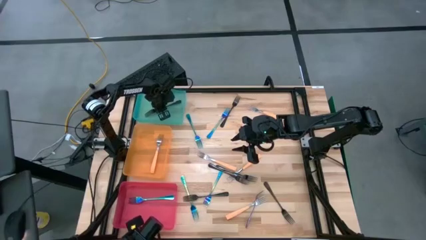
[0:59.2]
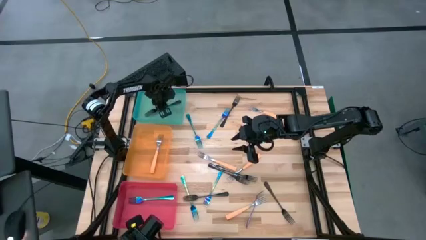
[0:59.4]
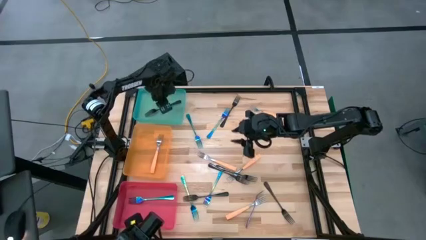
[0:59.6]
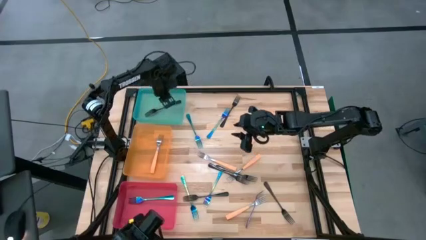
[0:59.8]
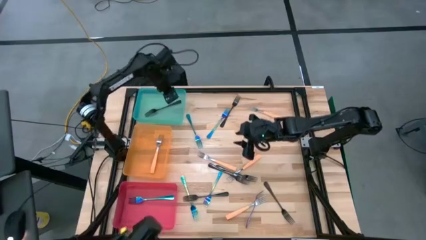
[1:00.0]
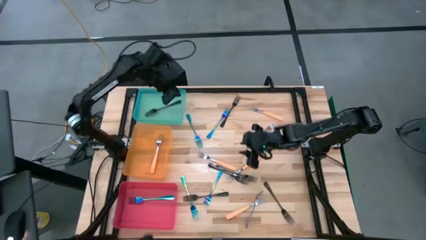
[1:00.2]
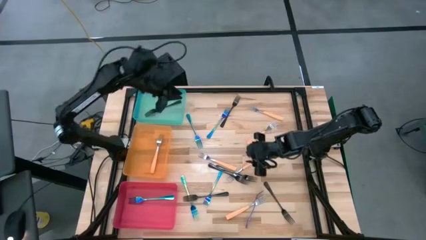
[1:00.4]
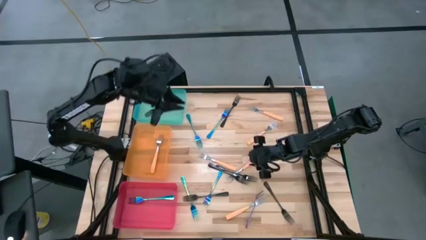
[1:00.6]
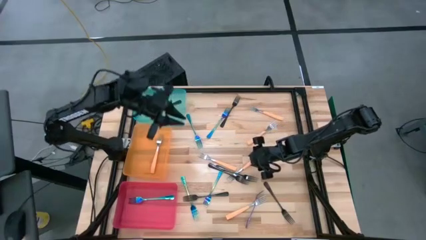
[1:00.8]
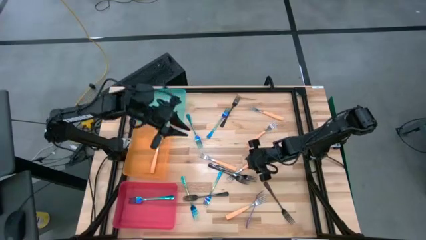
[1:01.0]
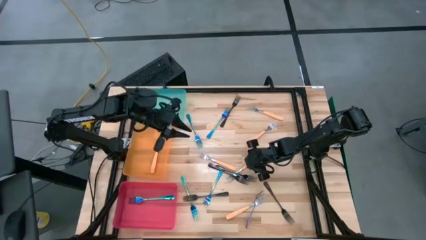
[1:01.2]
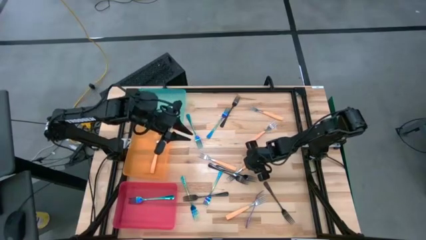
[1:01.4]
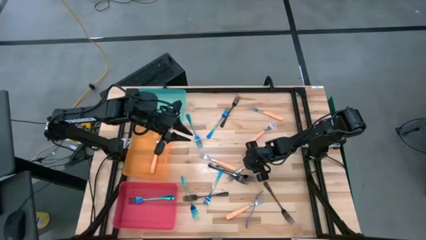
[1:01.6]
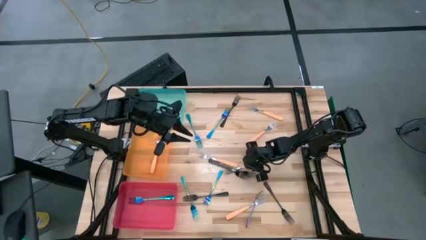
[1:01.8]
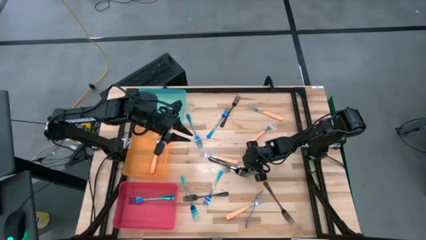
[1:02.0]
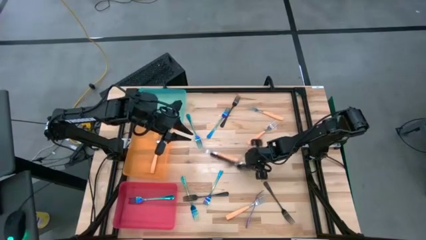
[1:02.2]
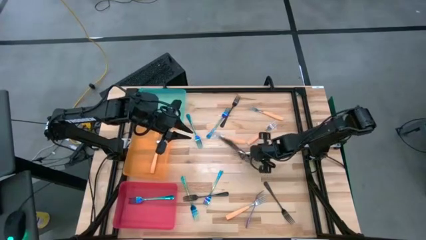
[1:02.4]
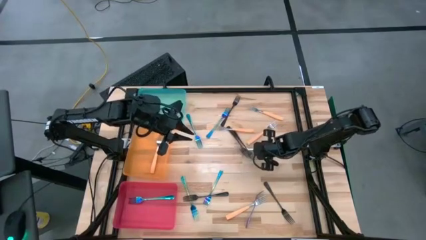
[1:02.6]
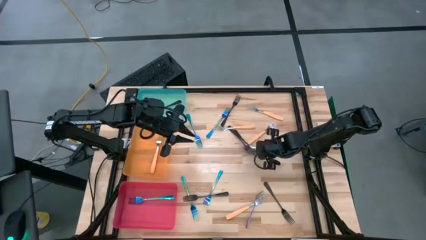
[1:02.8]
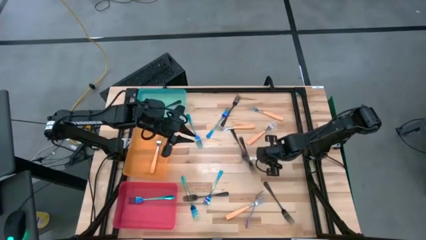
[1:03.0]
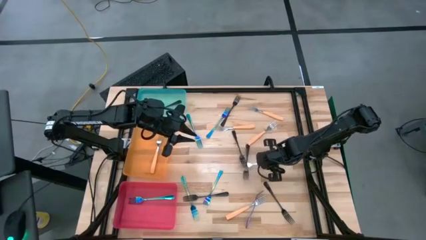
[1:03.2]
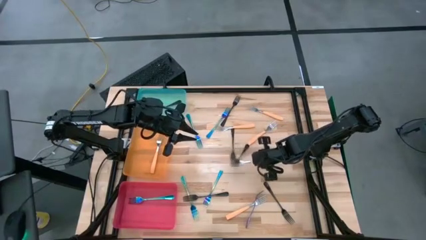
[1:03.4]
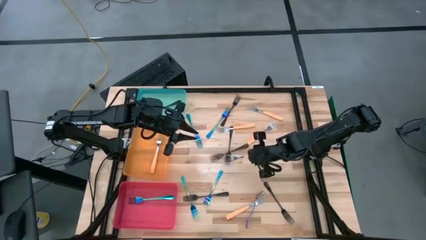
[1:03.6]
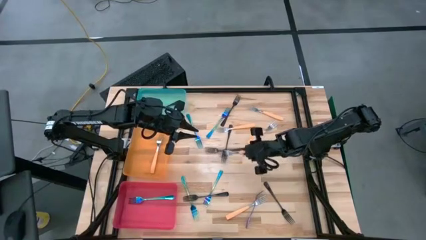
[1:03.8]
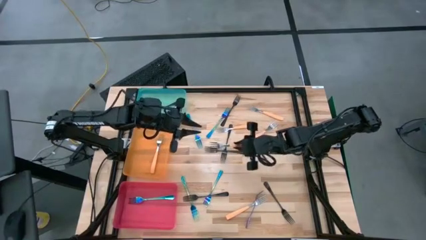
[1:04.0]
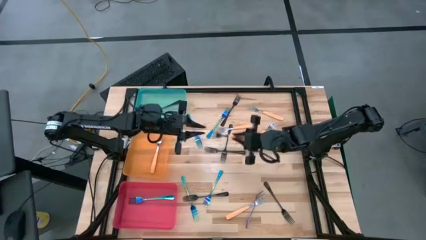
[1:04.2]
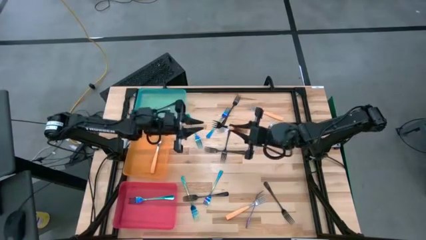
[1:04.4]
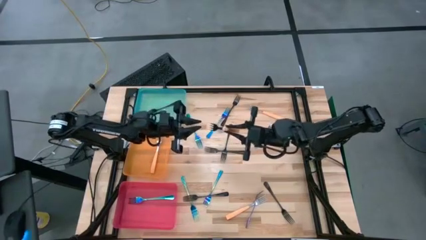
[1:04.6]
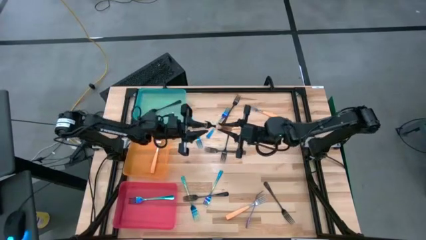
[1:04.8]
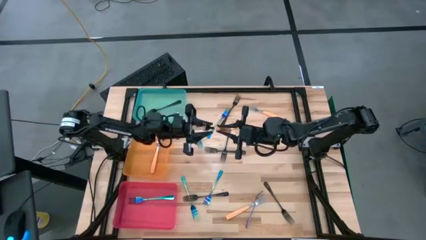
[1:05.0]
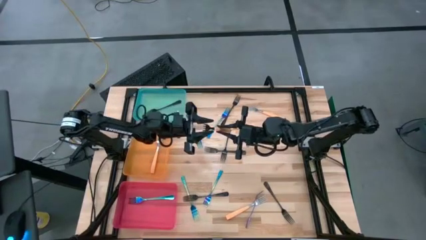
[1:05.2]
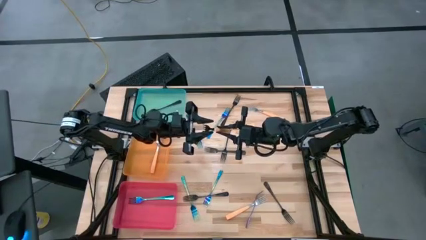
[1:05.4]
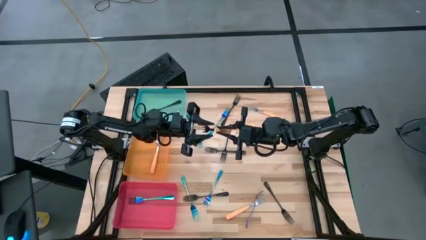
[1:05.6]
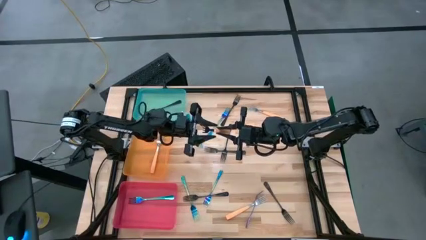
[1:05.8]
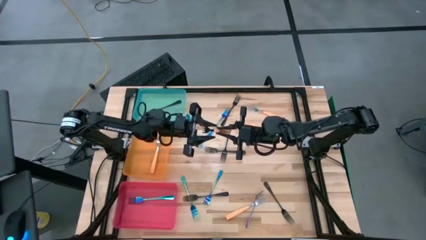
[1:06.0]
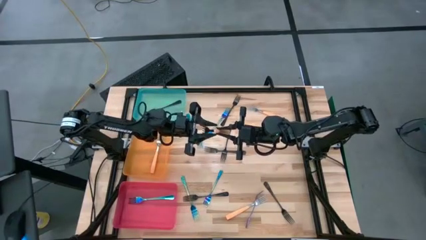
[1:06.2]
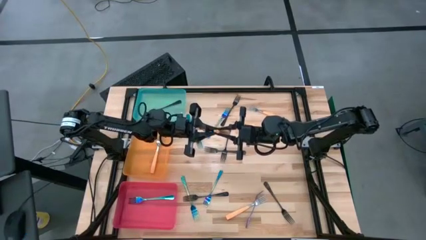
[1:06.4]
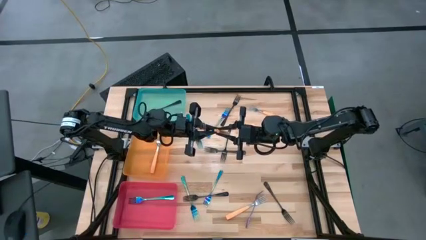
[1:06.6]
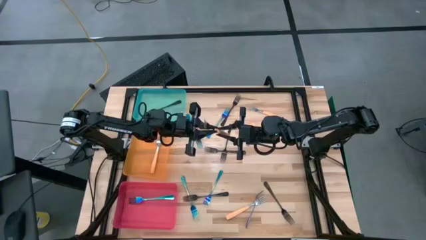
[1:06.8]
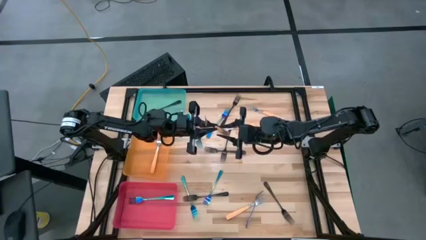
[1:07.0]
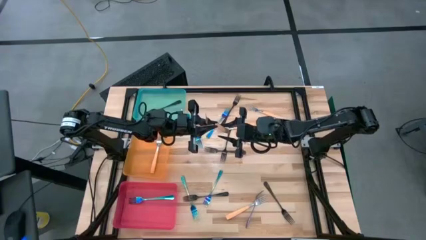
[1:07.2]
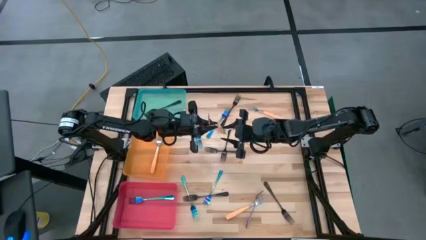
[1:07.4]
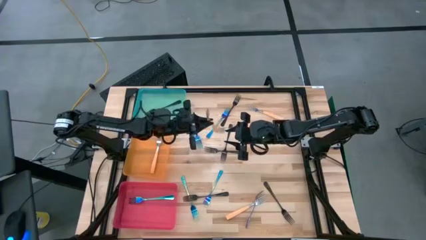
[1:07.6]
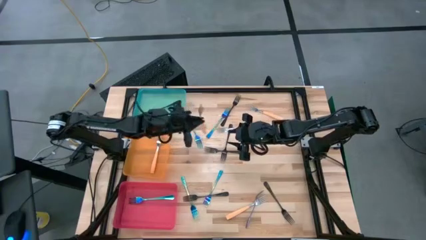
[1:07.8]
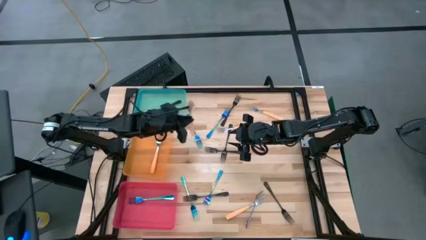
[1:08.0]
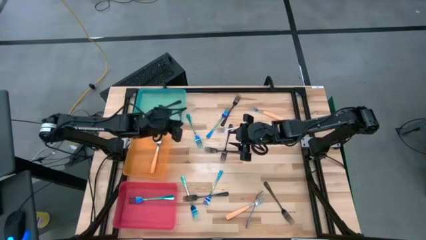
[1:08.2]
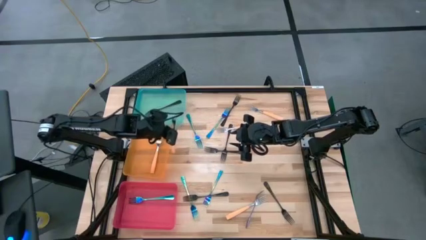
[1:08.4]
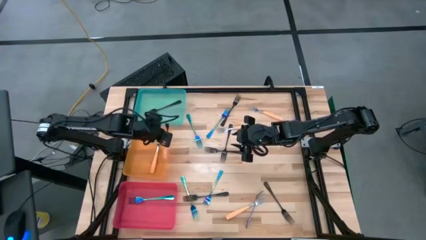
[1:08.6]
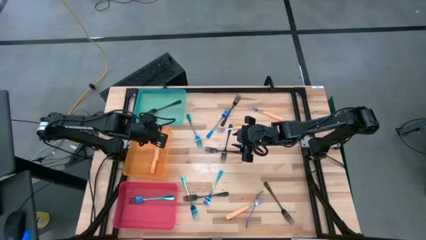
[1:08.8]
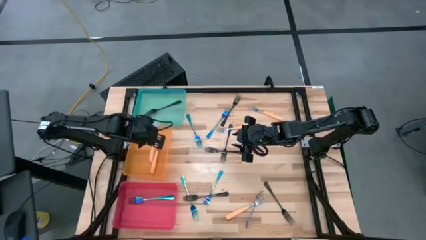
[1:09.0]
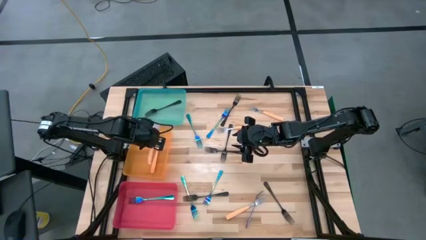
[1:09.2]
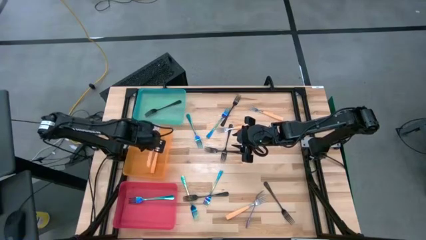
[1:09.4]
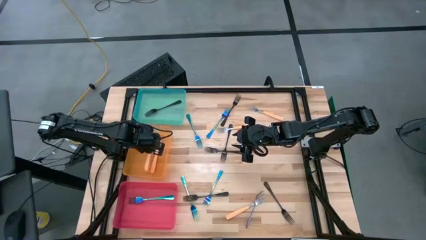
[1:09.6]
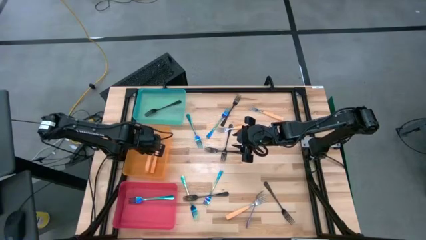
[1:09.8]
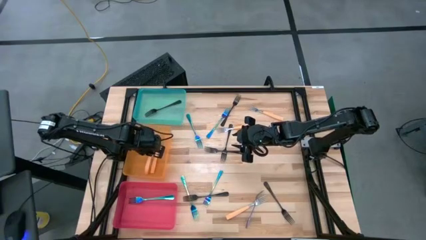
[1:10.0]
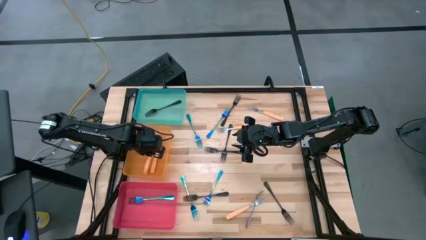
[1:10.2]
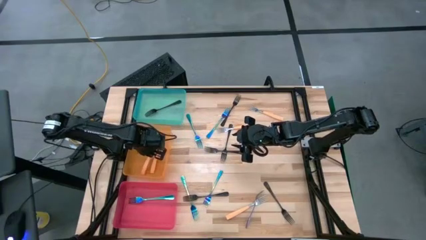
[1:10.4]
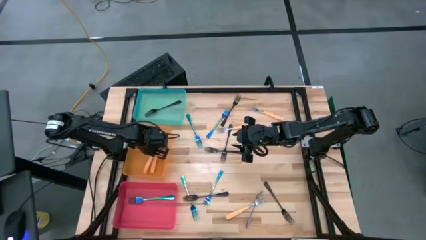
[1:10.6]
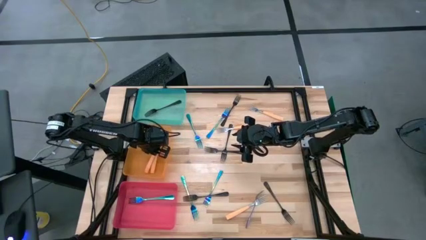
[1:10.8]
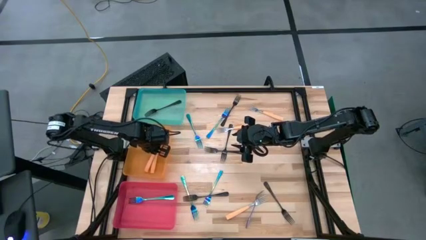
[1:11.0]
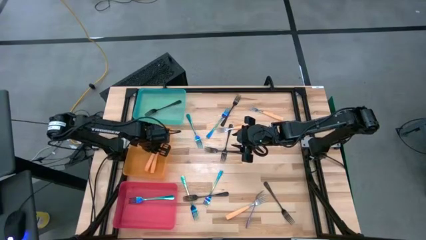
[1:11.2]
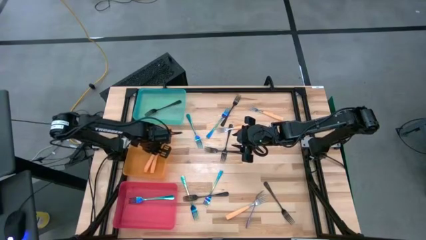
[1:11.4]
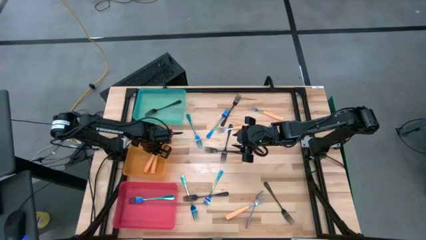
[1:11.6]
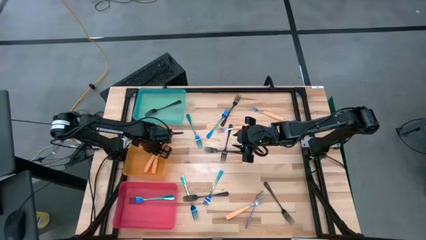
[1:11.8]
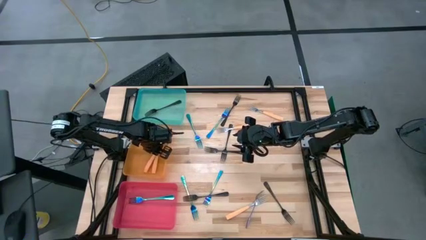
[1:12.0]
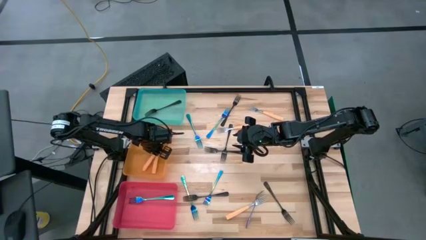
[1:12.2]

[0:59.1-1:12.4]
Task: Sort silverware by color (type)
Put the orange fork into the orange bin
